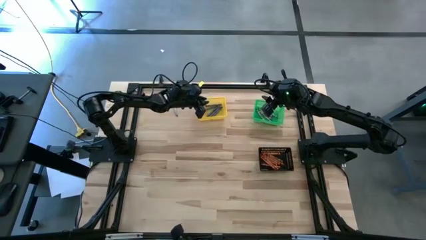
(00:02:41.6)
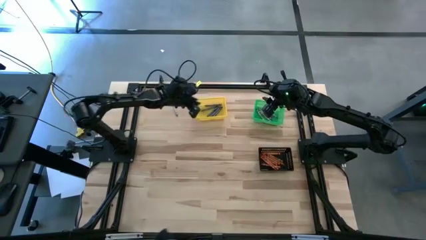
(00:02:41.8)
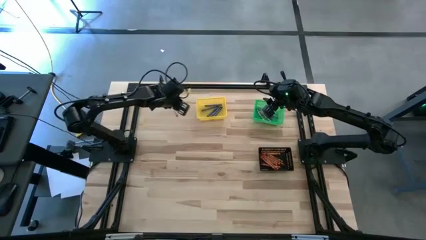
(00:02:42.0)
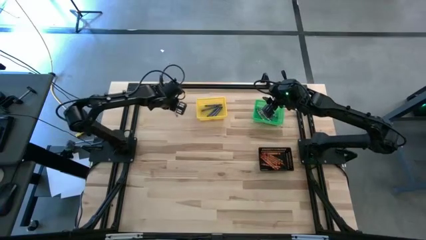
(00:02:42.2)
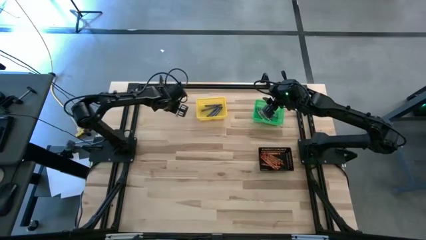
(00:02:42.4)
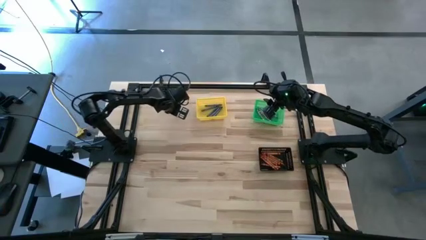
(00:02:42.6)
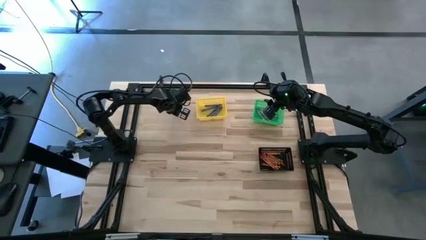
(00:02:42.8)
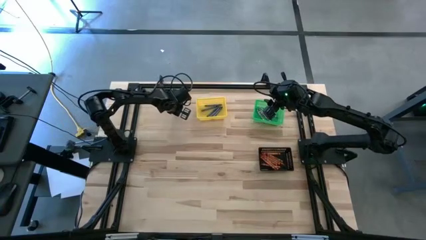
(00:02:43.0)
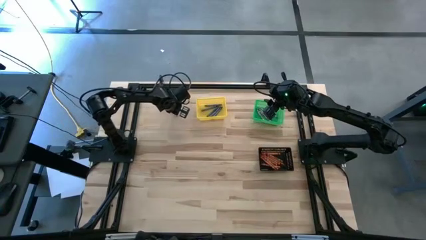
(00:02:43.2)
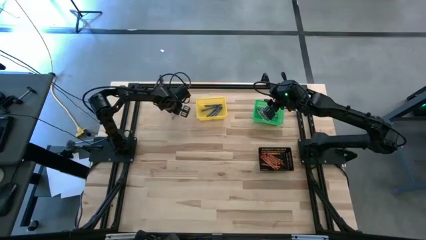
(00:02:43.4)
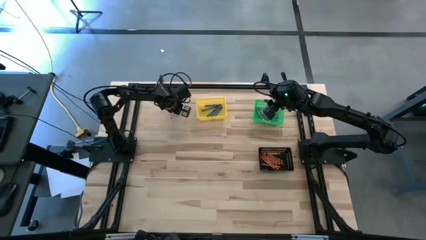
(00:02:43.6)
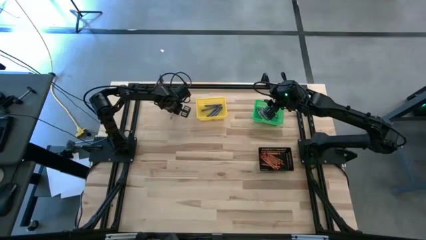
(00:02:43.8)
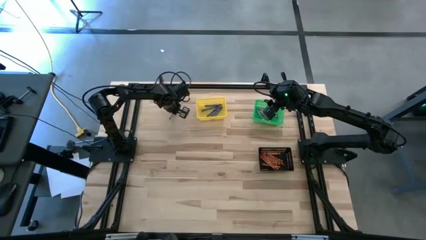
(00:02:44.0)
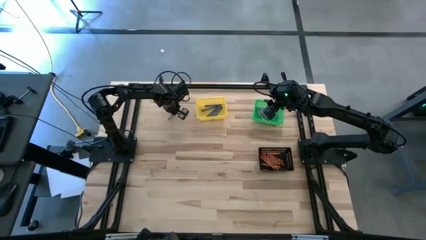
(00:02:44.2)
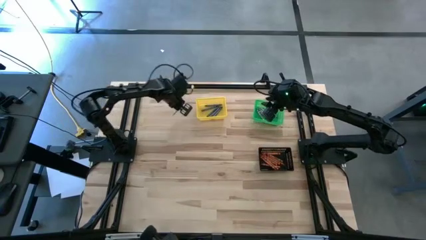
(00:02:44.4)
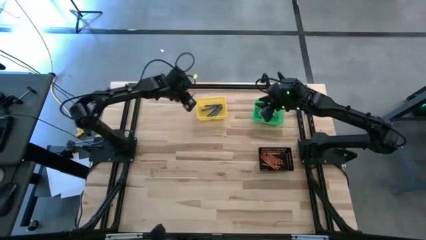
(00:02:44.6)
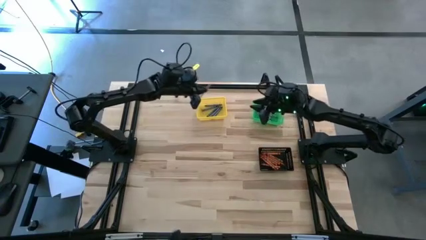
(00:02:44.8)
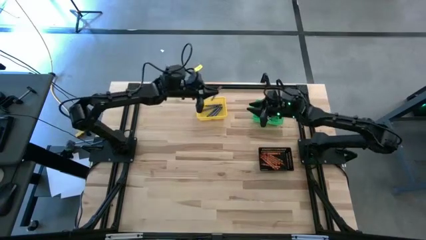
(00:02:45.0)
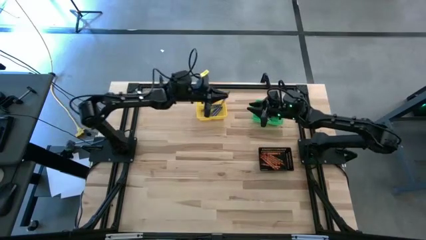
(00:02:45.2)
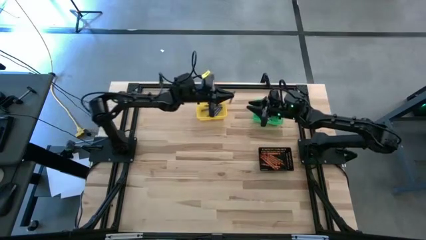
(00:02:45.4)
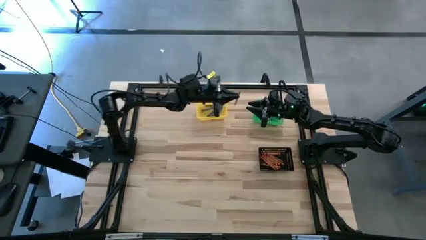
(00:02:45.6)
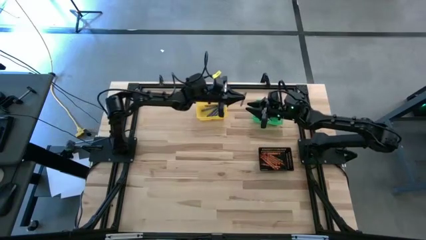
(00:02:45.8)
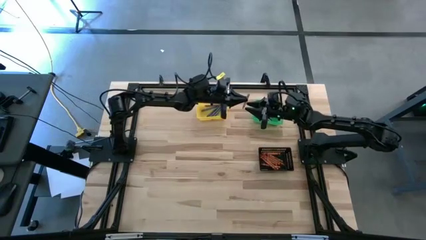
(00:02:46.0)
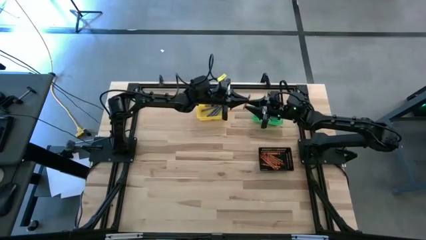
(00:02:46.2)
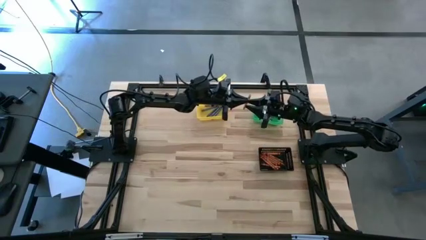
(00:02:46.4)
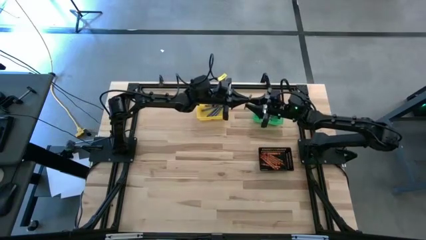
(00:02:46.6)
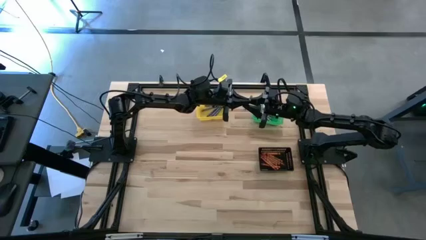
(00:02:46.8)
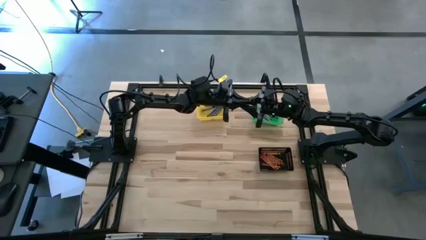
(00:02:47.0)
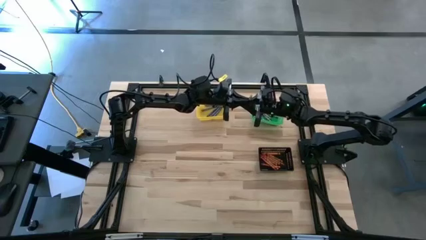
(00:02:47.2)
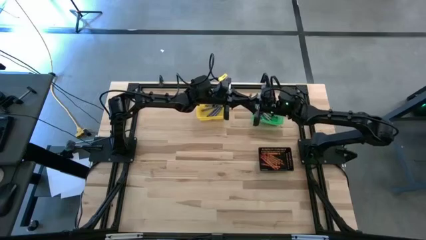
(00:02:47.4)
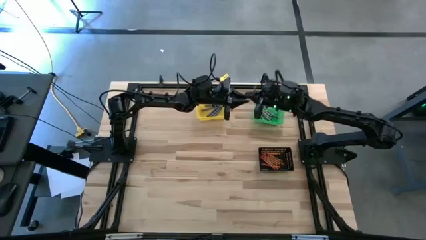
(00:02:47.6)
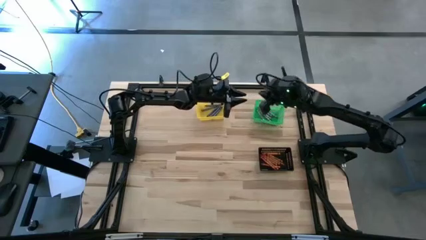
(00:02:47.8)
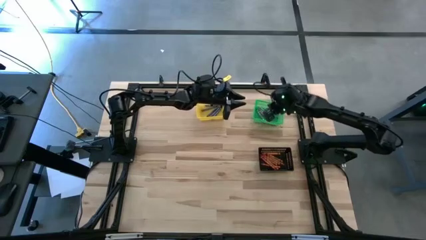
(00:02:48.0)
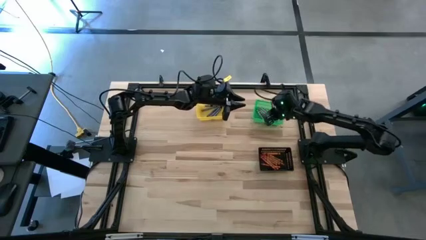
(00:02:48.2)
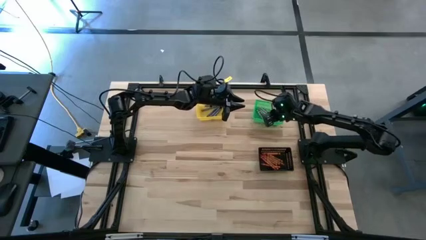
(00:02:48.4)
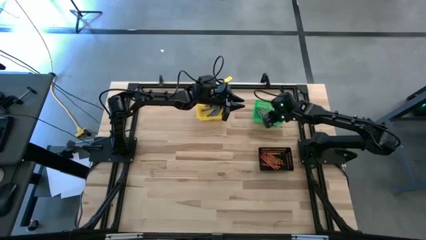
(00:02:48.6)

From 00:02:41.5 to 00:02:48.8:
Task: Sort crayons
Put the gray crayon into the green basket

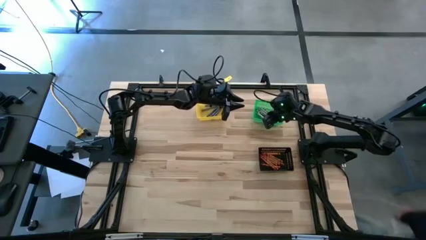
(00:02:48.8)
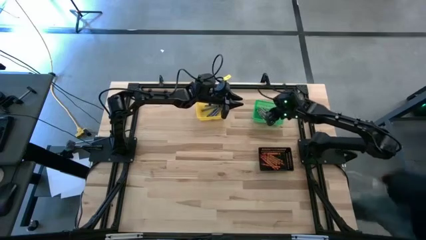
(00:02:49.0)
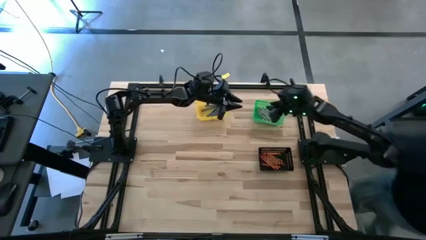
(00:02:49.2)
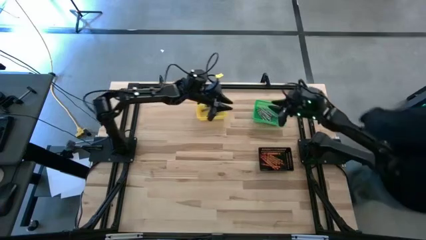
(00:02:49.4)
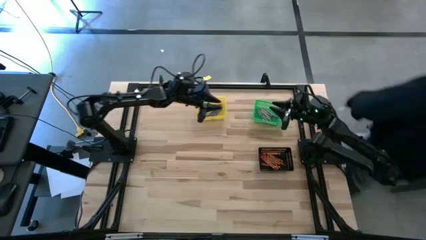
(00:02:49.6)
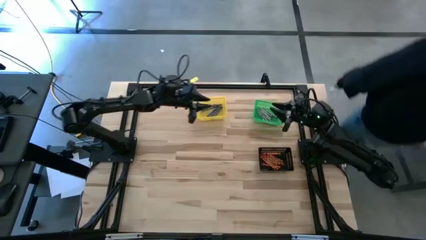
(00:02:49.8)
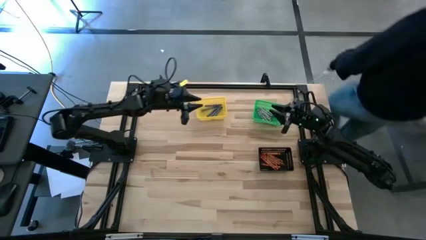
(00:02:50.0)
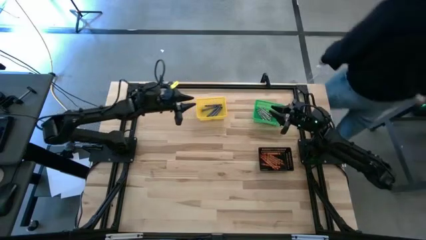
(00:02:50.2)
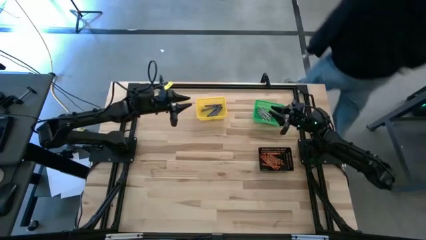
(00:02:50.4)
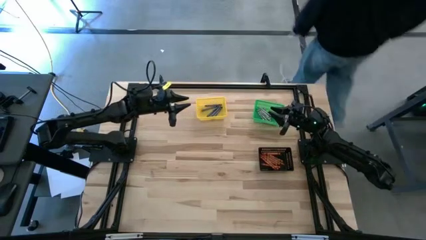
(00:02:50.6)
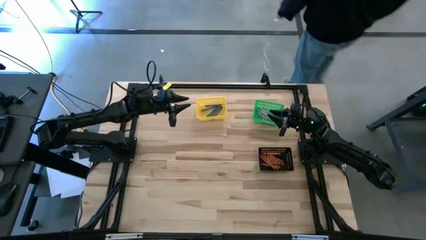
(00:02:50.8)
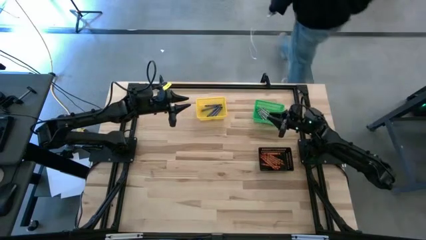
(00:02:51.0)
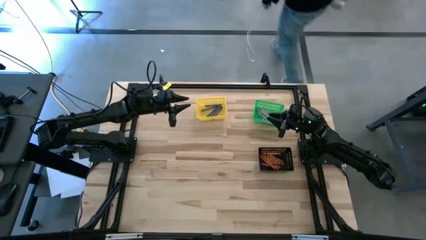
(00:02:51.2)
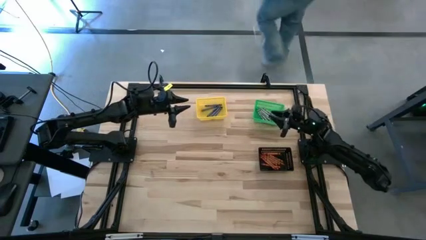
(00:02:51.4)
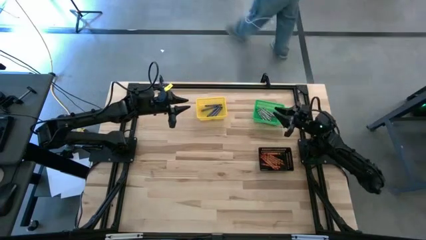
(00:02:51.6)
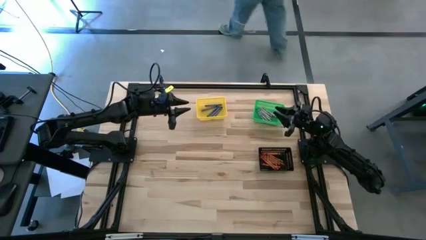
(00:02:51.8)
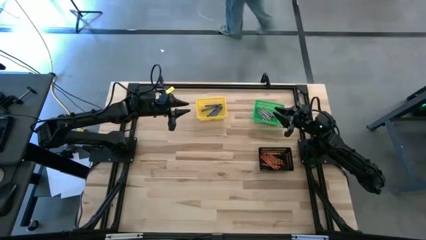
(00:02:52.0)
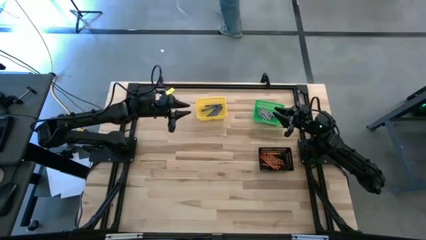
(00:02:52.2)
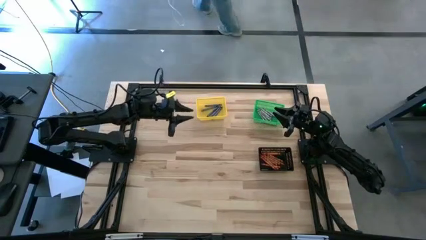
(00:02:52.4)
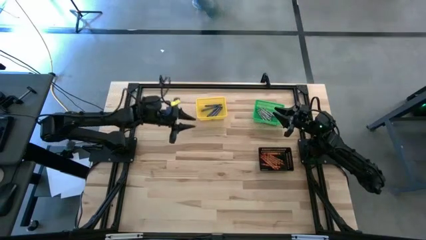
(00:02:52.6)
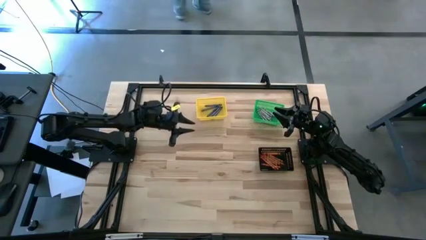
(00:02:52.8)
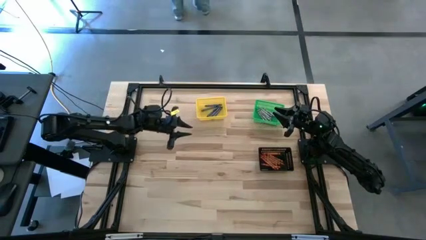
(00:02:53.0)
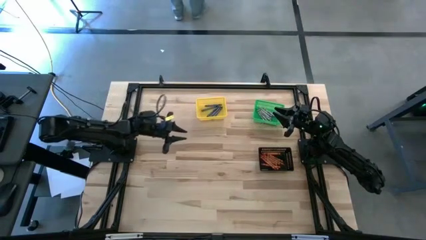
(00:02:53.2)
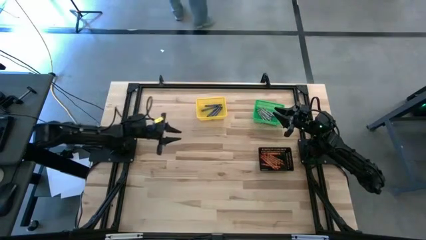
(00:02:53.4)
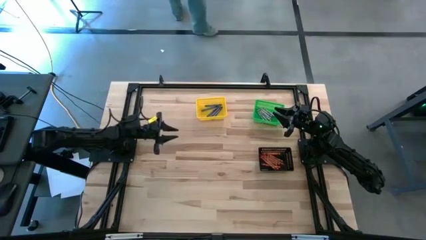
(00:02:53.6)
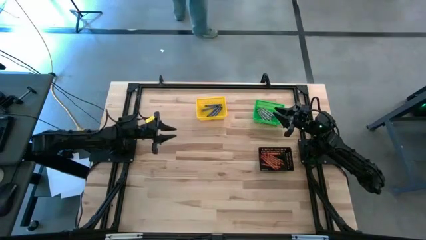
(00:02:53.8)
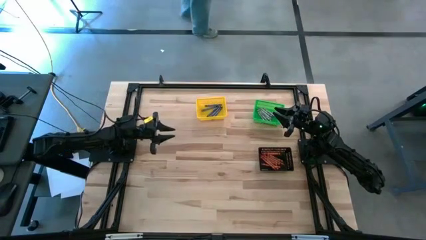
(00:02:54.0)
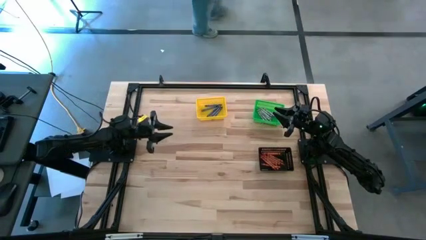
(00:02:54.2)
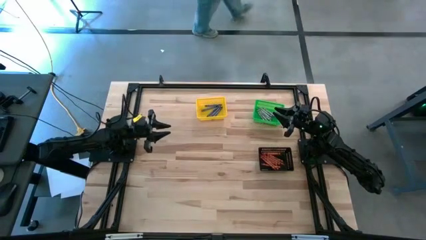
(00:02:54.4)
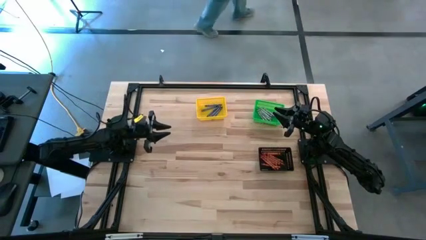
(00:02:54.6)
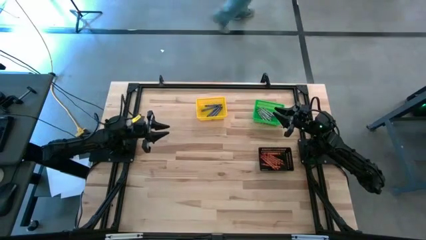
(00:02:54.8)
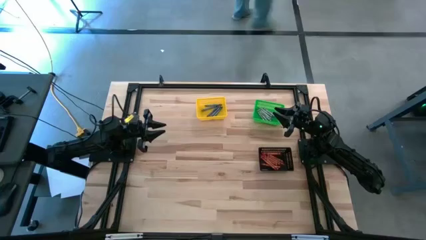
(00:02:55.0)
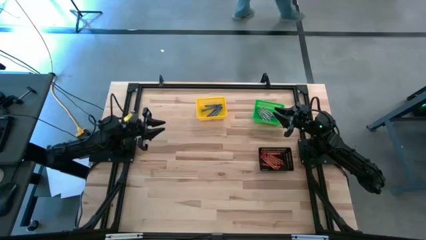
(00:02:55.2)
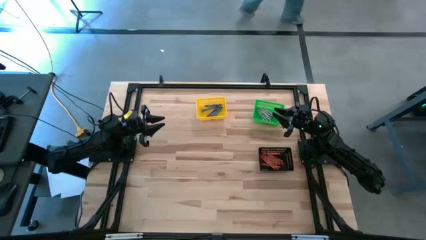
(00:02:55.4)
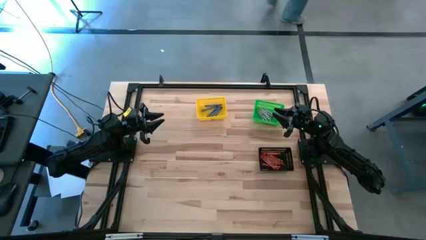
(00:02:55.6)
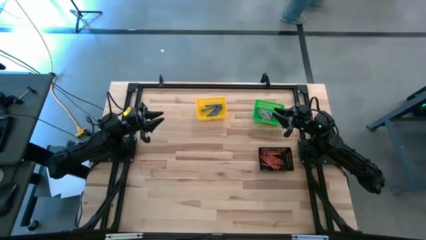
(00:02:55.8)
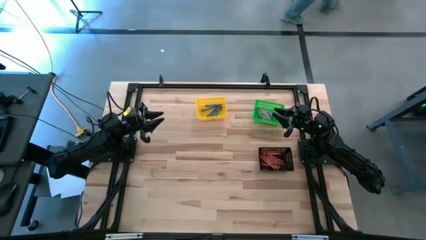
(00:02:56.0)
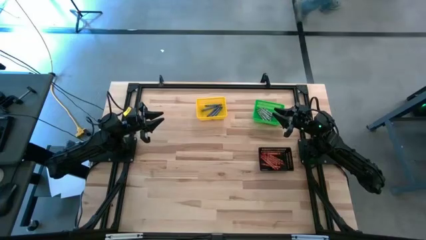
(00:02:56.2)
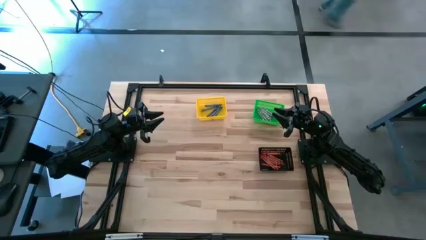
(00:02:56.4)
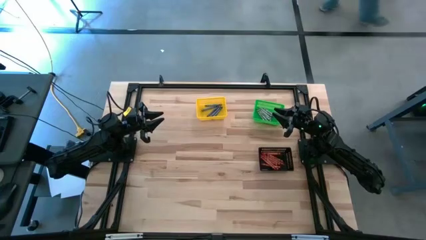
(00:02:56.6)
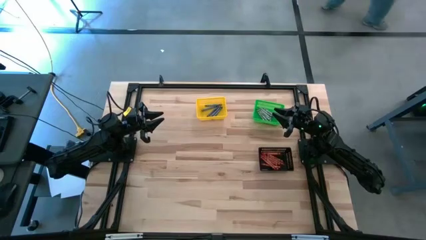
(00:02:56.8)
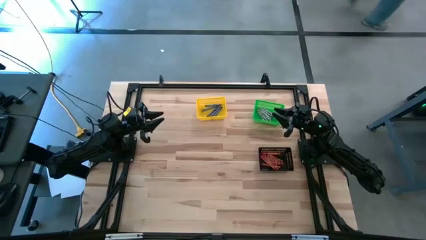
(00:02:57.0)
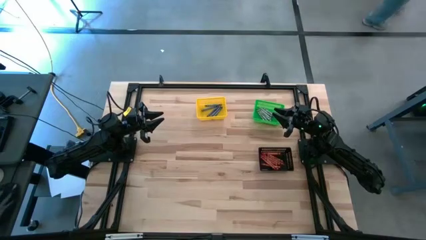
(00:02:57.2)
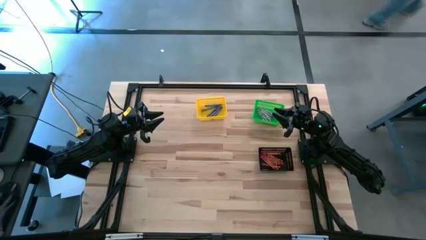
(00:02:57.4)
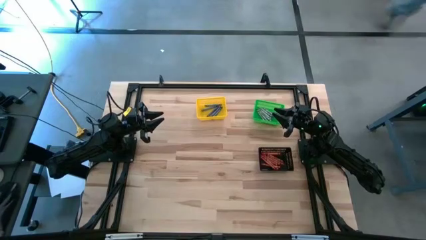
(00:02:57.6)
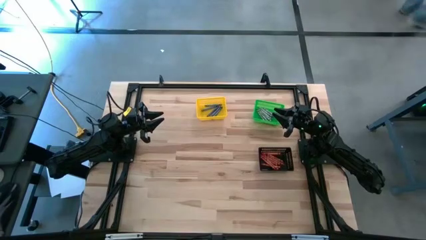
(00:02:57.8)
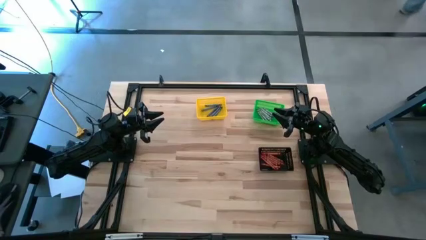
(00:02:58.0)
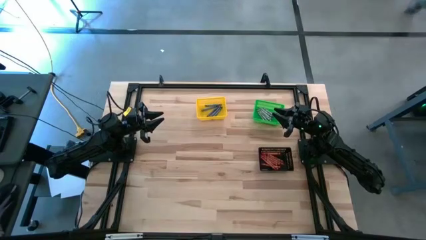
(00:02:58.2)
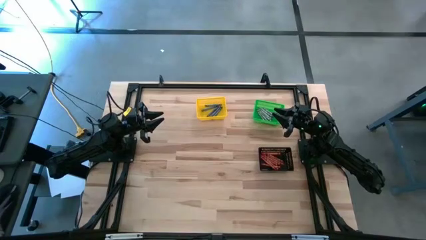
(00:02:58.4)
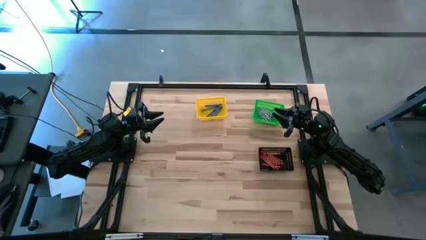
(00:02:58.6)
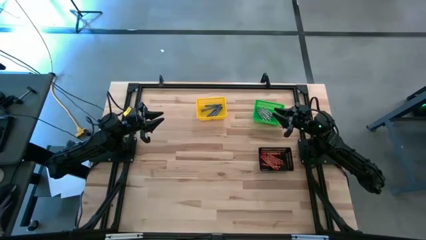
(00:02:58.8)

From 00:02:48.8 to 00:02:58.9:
Return to Home Position
